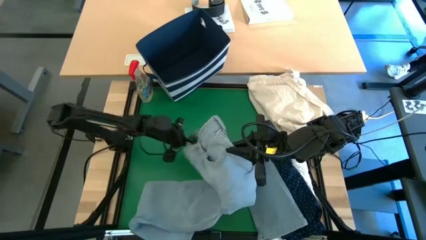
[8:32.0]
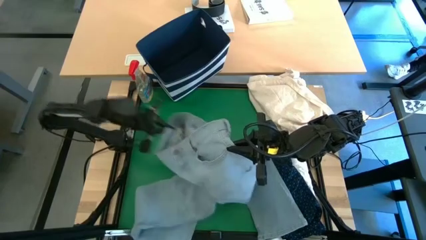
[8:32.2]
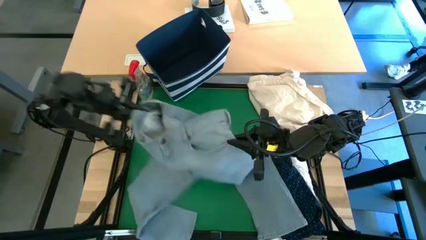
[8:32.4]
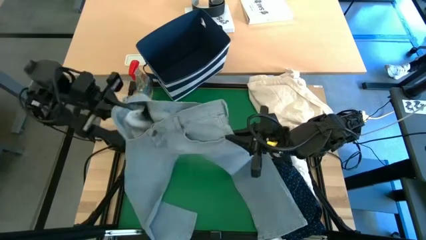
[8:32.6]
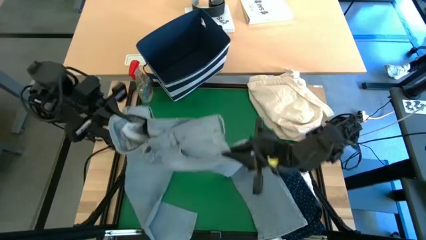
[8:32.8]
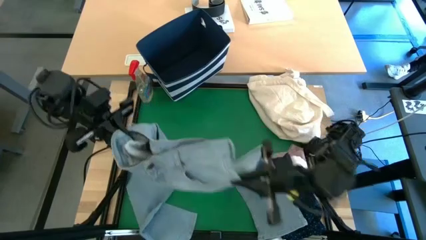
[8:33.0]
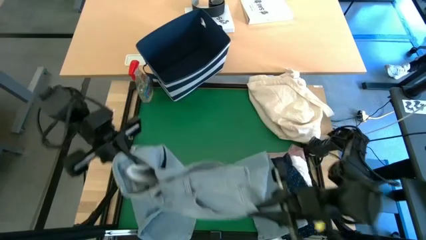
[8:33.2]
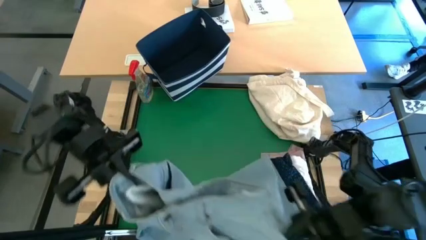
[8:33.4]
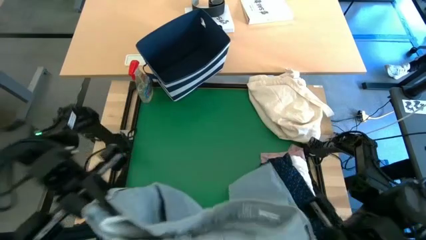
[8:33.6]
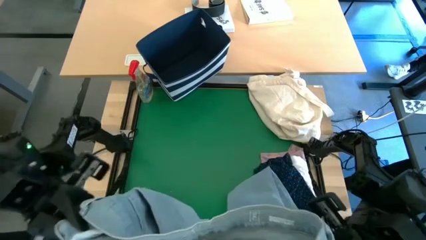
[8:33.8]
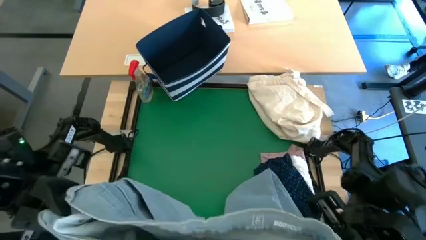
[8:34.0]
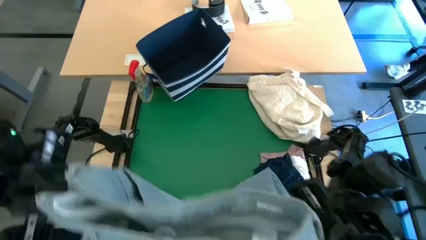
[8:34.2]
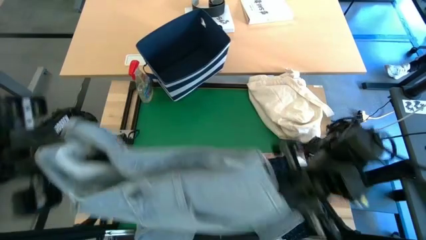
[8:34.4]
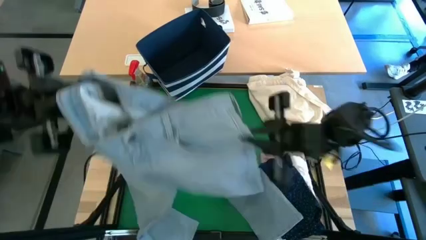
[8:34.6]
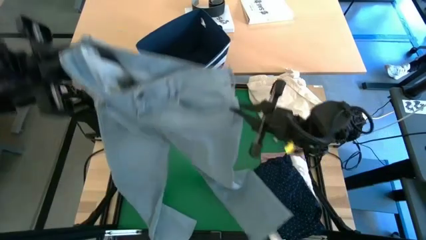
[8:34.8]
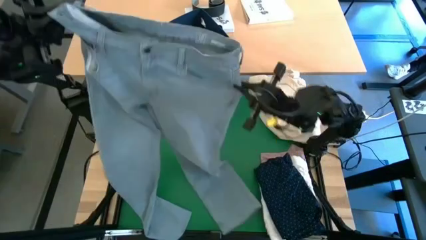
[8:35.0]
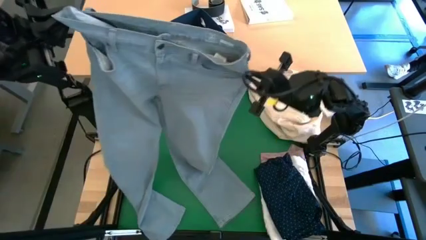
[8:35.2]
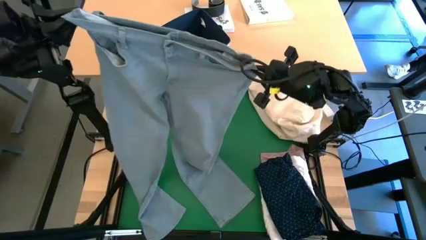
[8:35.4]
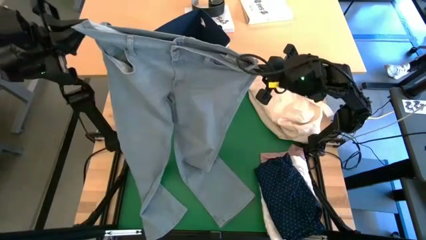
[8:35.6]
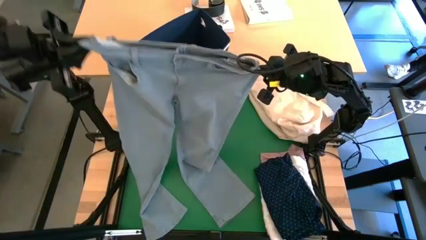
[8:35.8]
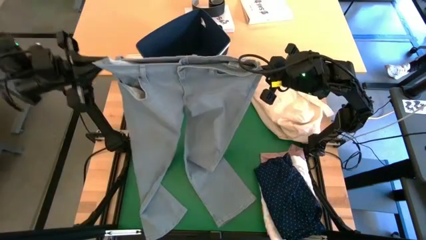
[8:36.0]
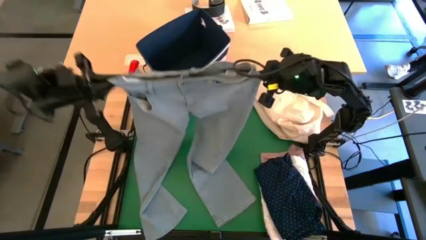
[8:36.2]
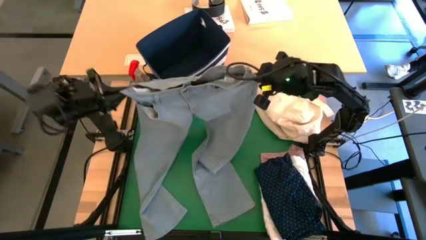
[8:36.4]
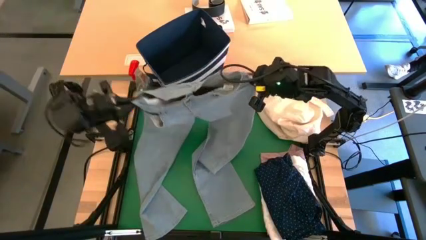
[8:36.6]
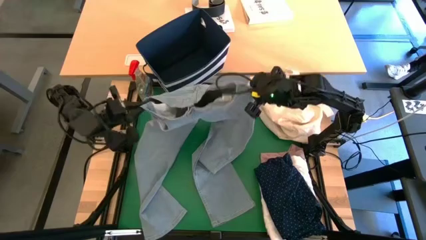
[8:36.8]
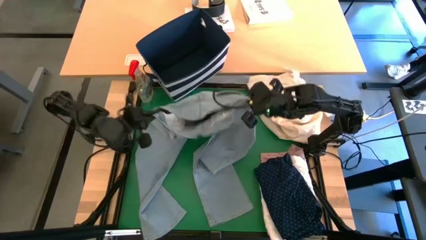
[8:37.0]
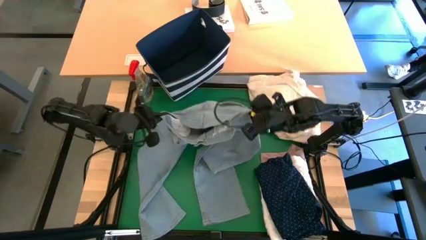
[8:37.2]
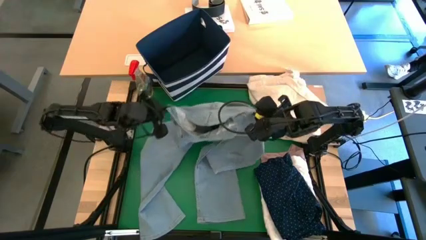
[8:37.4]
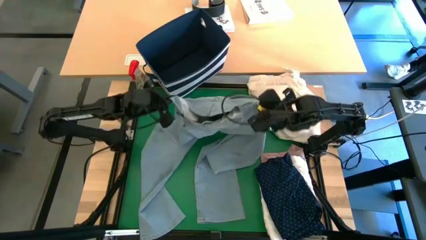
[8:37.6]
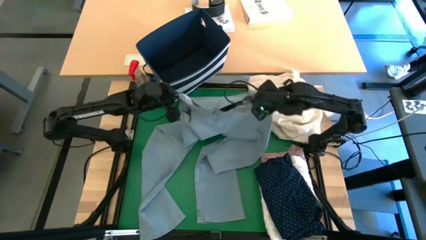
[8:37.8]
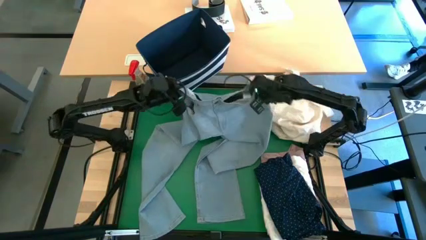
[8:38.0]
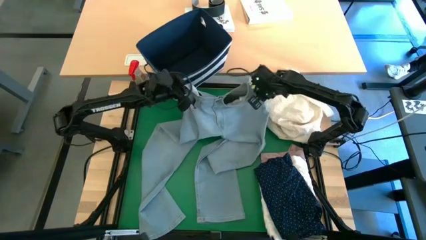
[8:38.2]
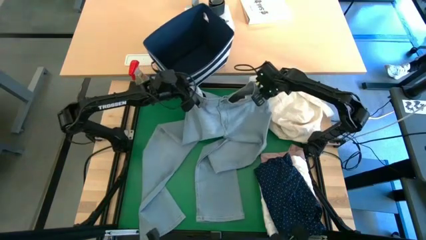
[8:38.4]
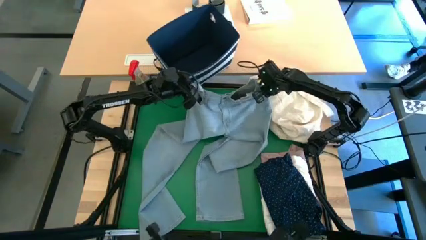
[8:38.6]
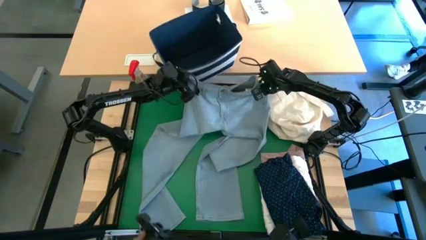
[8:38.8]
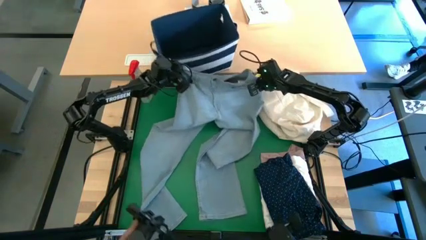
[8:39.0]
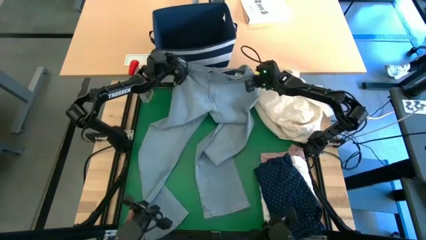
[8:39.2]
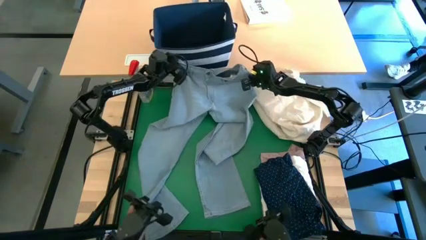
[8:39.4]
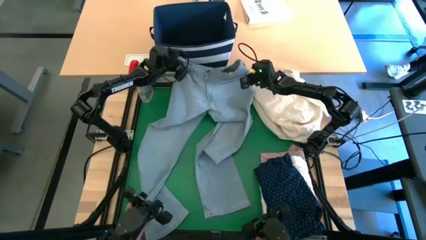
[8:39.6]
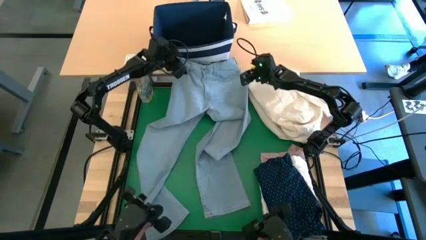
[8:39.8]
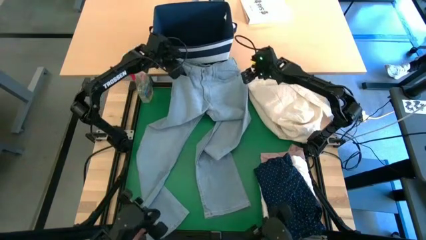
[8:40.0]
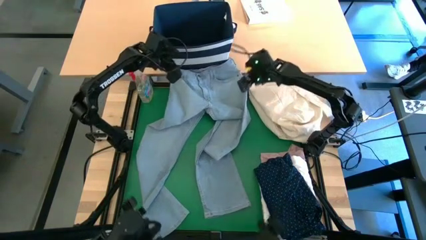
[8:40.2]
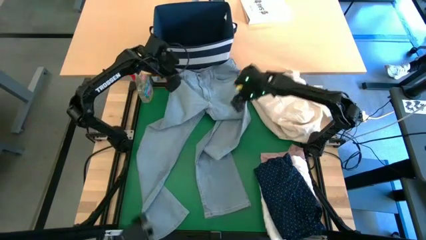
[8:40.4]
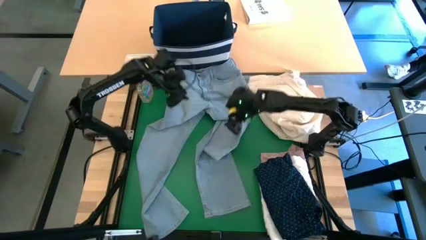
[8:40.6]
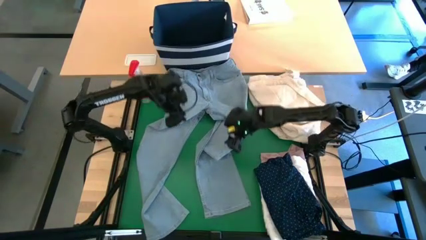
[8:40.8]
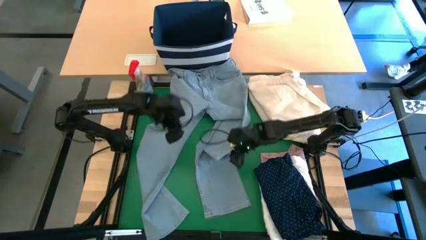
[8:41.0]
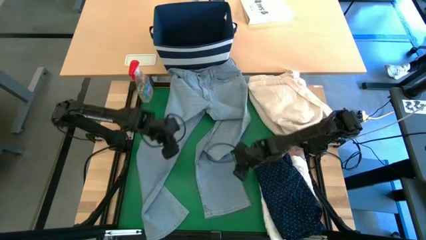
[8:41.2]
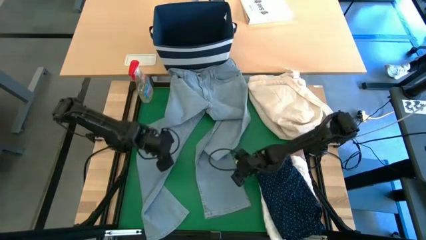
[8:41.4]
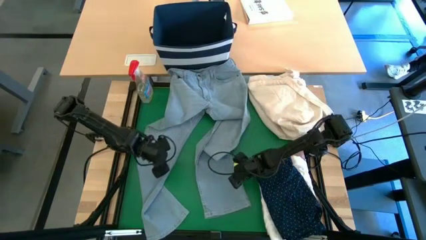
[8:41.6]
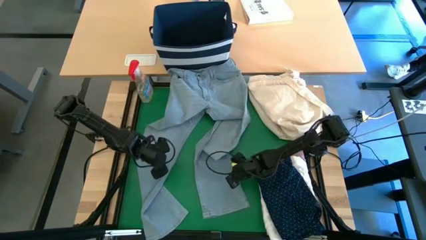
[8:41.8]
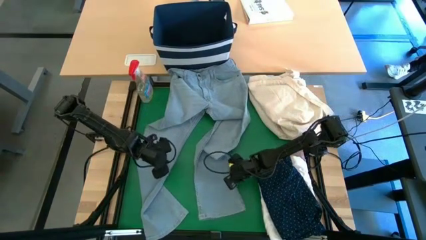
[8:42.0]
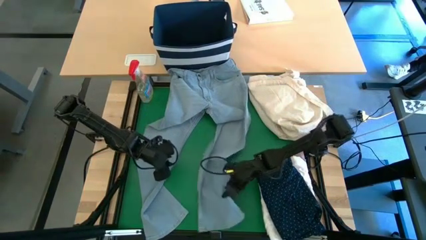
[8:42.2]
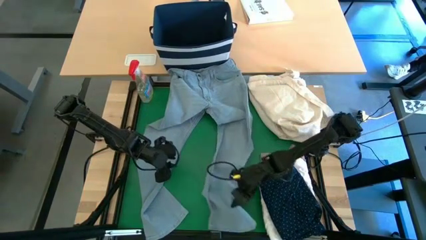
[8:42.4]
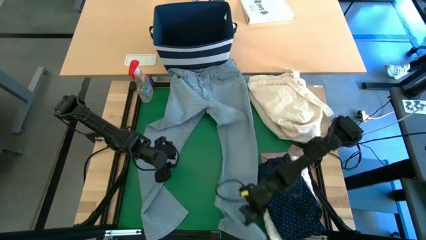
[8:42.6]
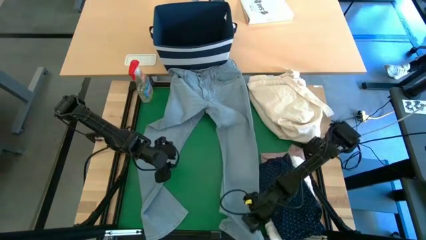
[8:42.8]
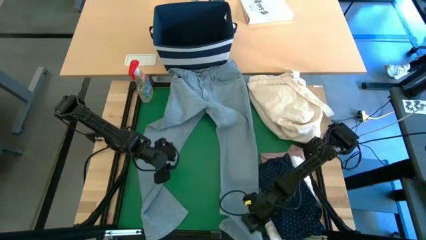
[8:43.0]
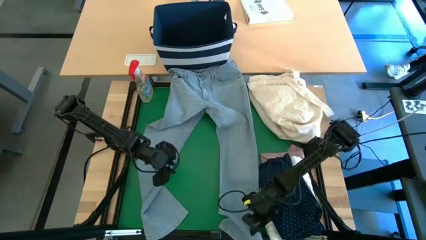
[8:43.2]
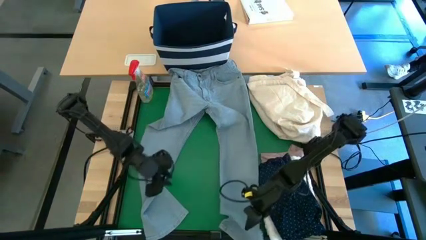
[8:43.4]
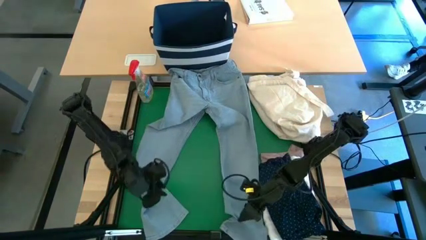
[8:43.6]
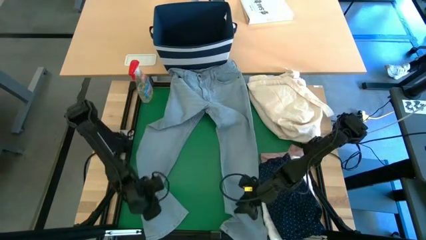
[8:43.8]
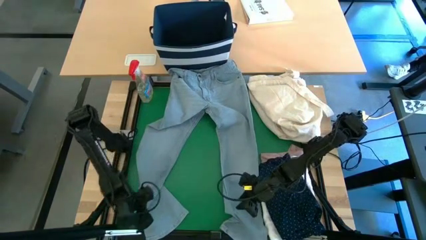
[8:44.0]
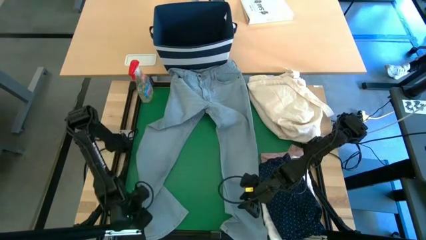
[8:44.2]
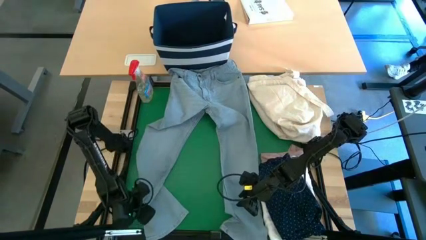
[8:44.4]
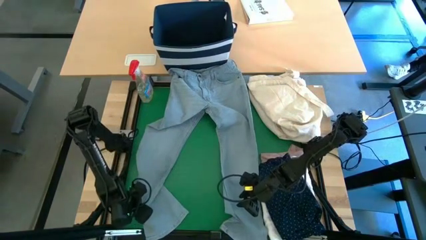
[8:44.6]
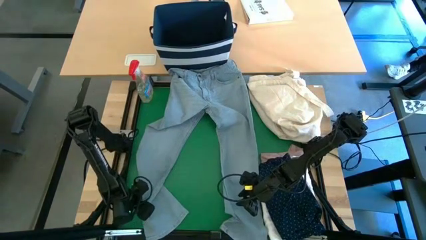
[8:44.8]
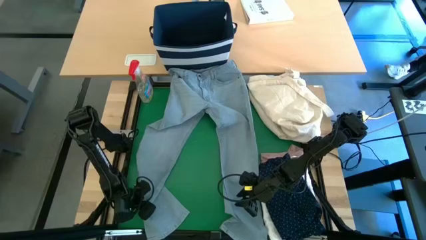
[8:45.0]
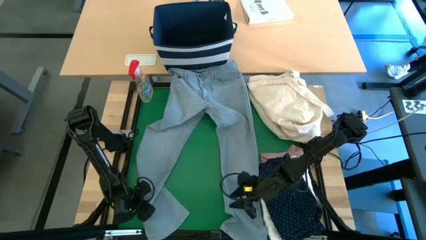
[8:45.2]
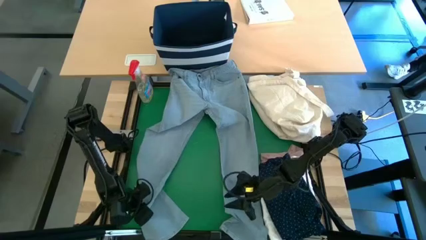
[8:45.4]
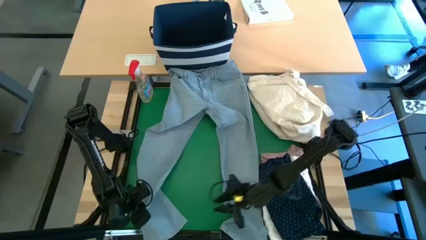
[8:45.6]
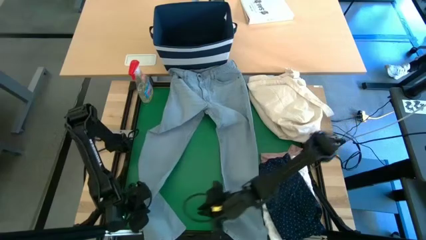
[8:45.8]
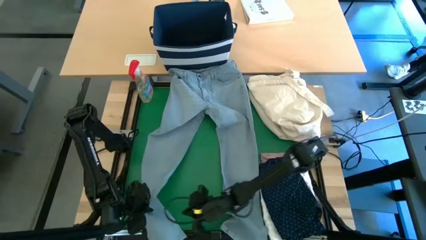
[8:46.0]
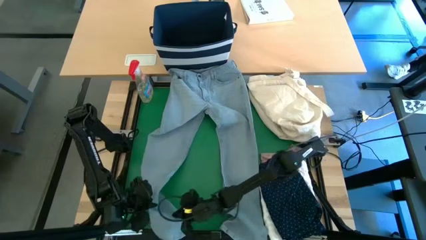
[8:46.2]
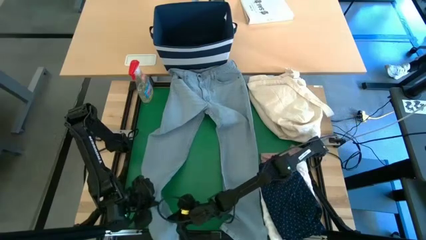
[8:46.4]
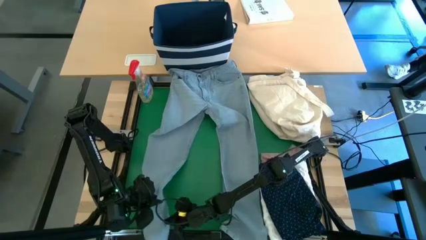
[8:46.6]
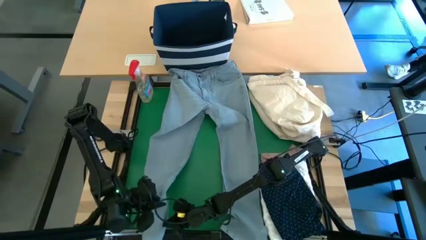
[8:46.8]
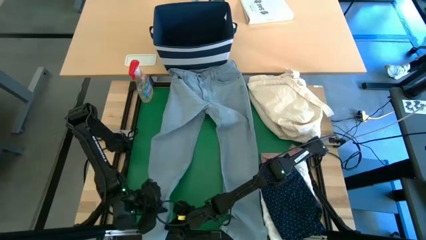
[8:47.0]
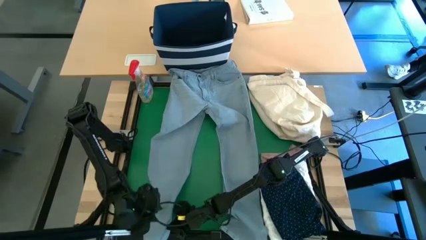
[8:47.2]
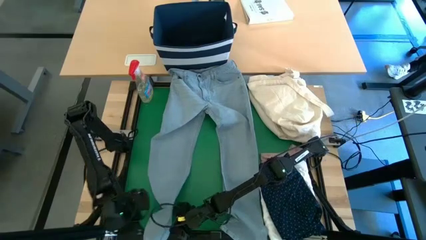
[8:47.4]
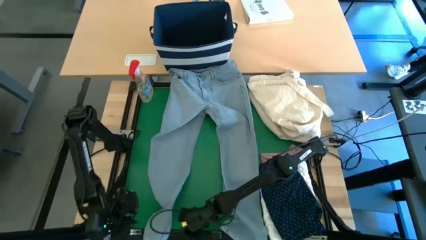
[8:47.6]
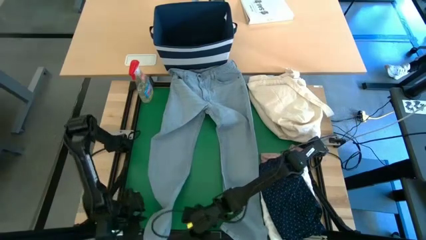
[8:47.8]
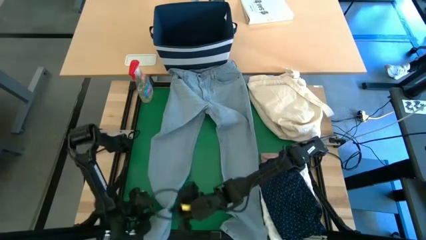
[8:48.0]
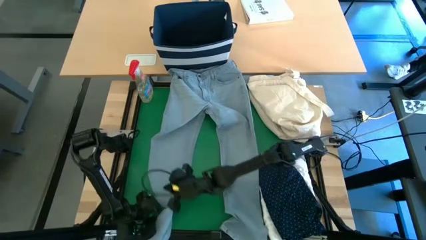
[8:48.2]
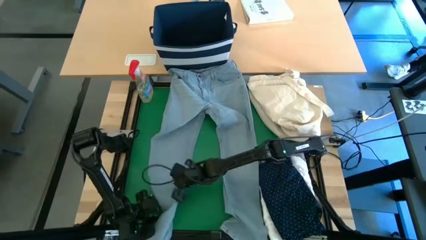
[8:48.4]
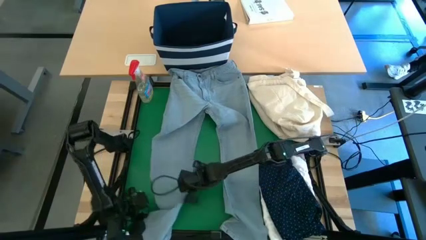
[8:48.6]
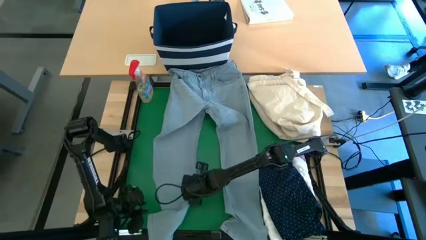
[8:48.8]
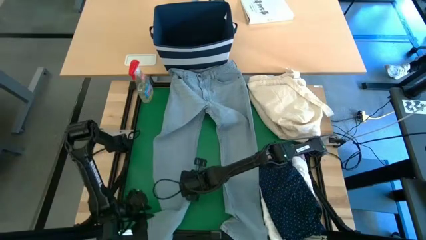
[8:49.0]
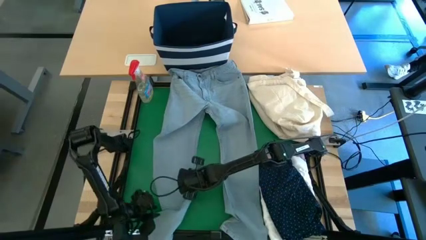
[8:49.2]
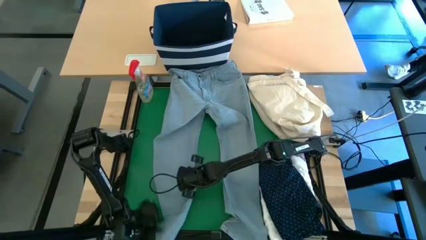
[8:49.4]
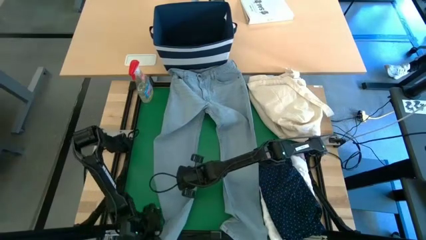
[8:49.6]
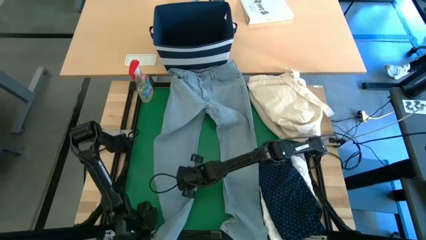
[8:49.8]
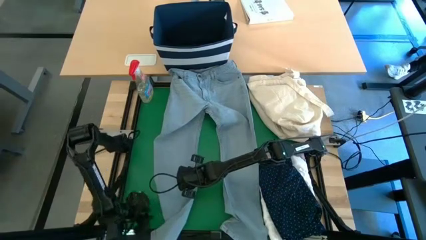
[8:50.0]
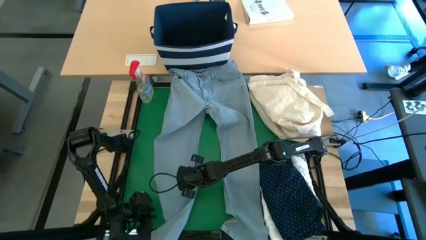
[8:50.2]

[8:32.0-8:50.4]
Task: Fold laundry
Fold the blue jeans
